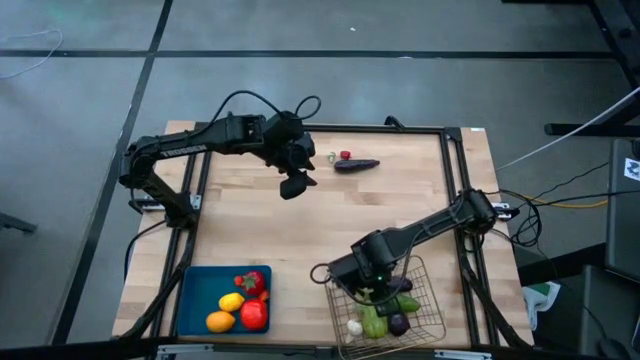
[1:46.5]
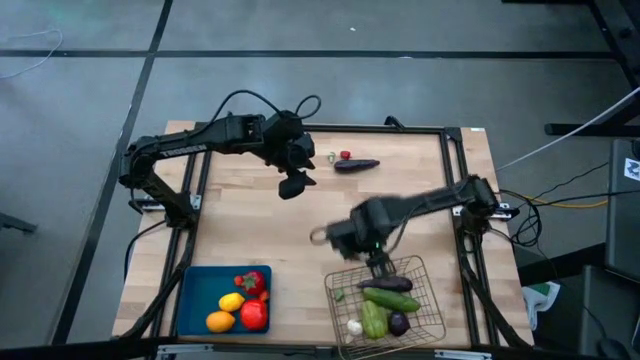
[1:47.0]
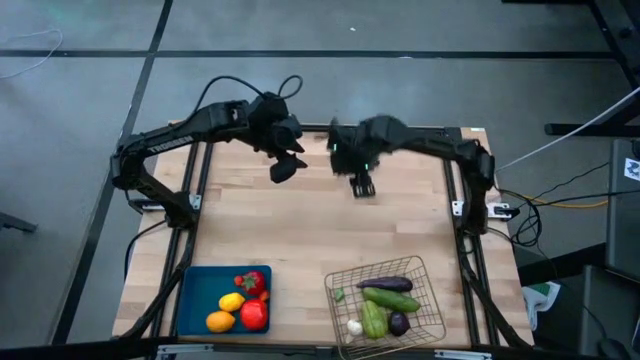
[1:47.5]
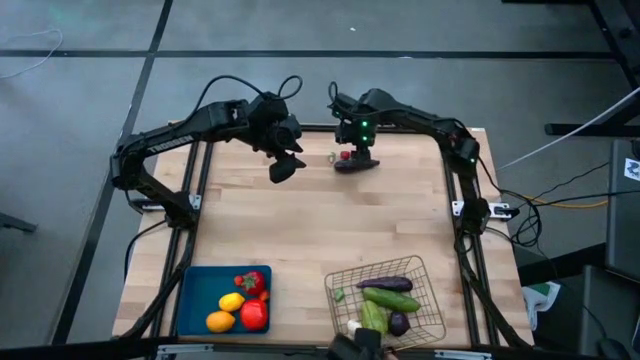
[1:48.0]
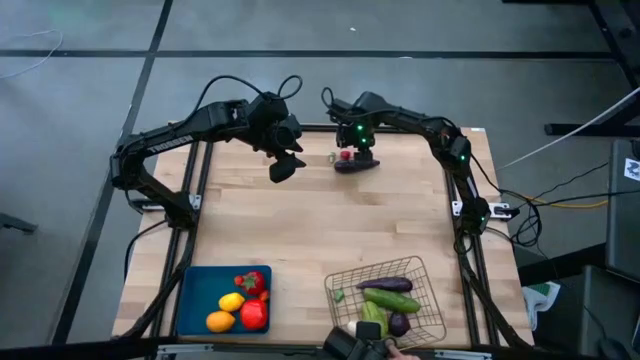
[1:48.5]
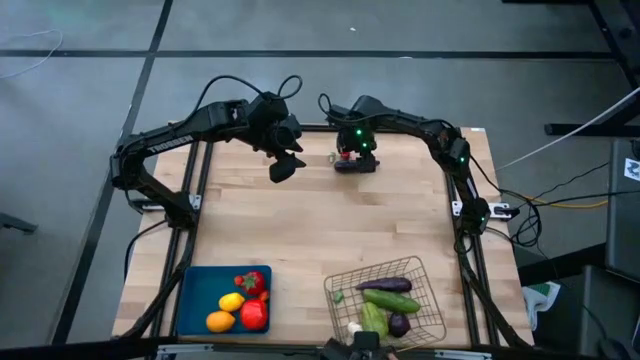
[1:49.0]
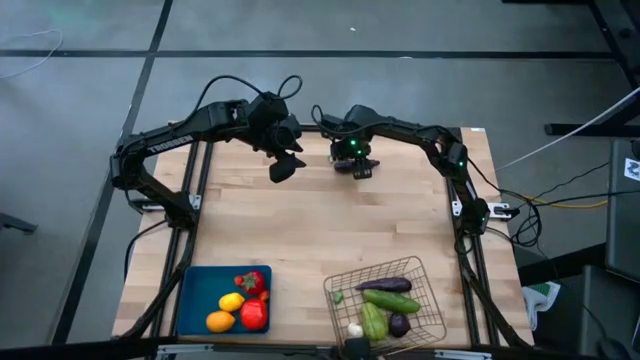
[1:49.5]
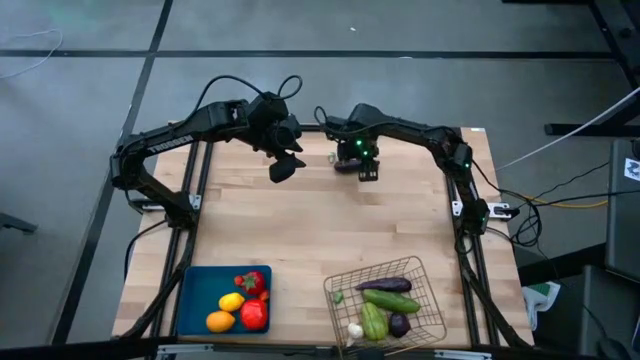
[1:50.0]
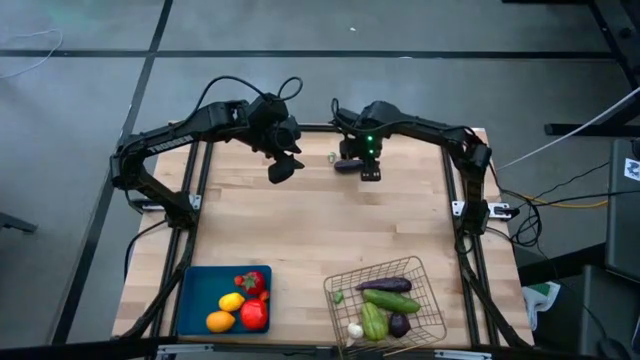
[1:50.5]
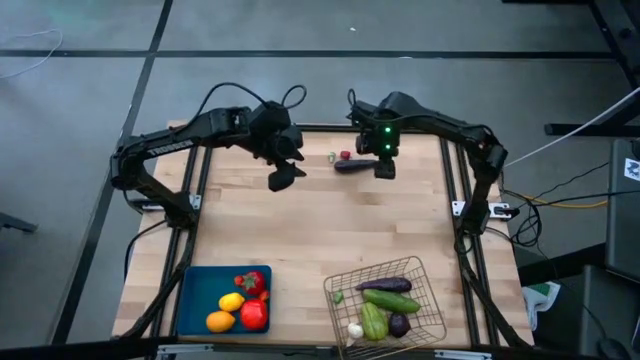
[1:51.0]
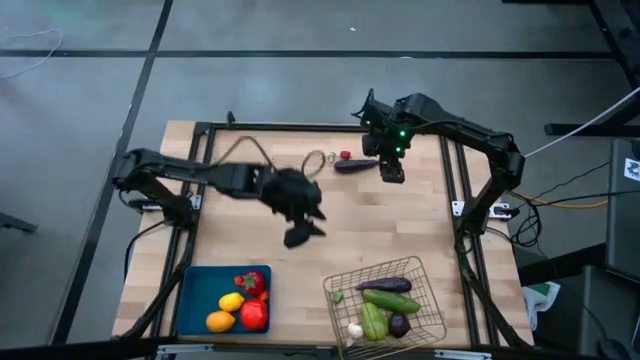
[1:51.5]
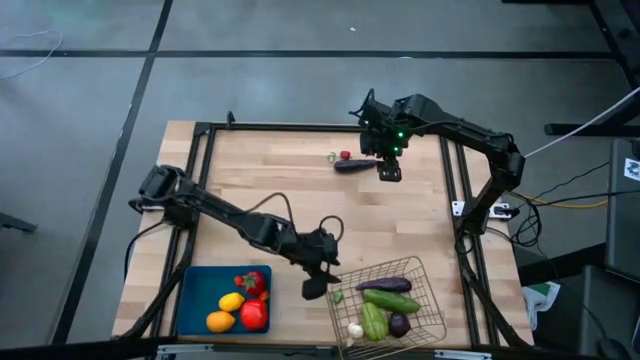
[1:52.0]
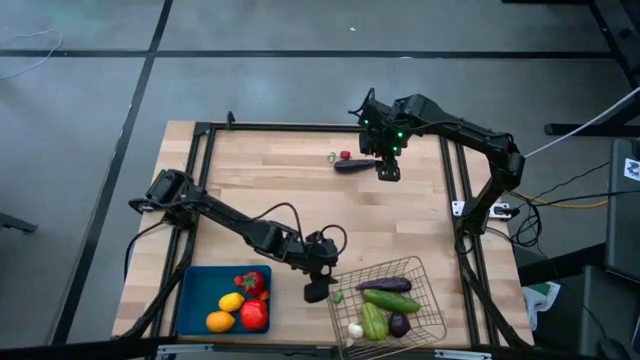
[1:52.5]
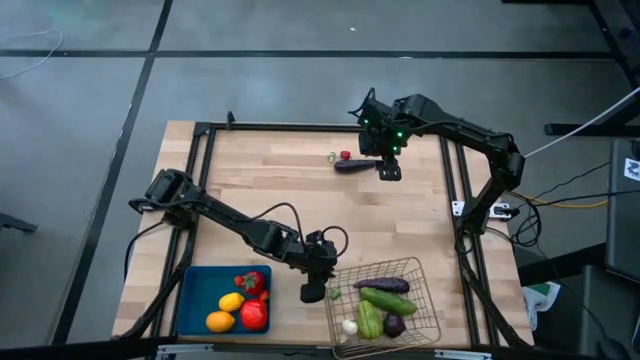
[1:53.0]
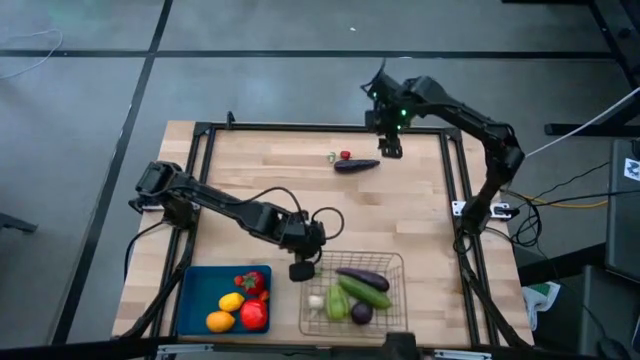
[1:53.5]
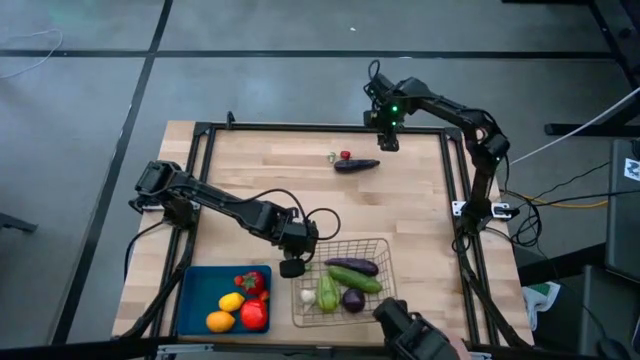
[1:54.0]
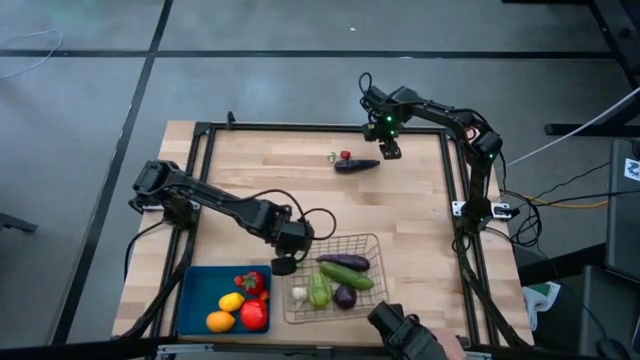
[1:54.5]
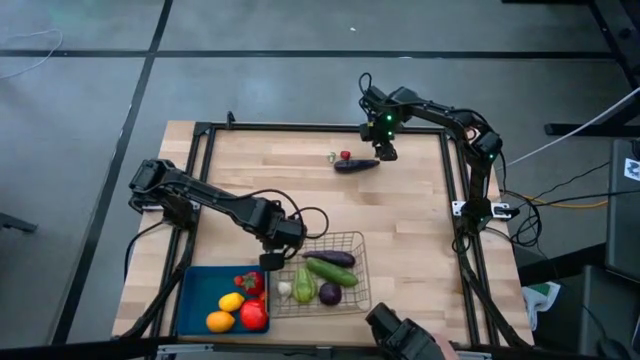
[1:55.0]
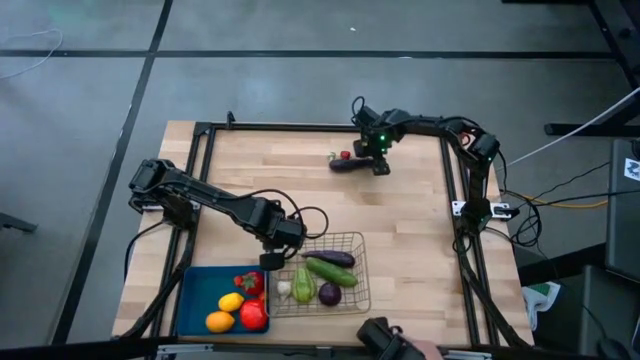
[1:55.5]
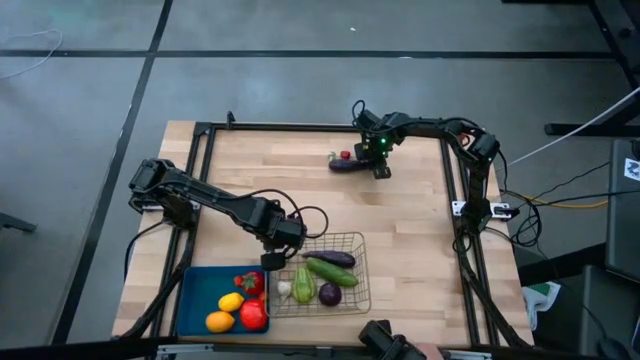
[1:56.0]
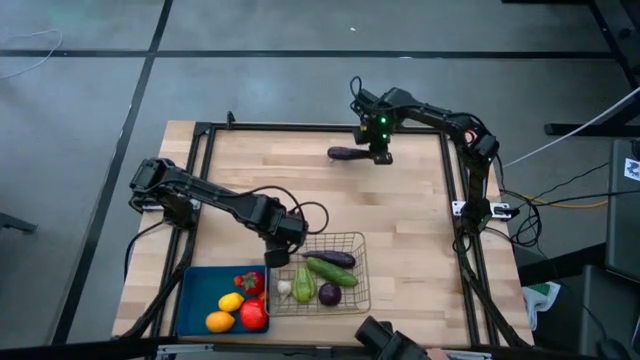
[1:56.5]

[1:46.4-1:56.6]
Task: Sort produce into baskets
Adjust the gold wire basket

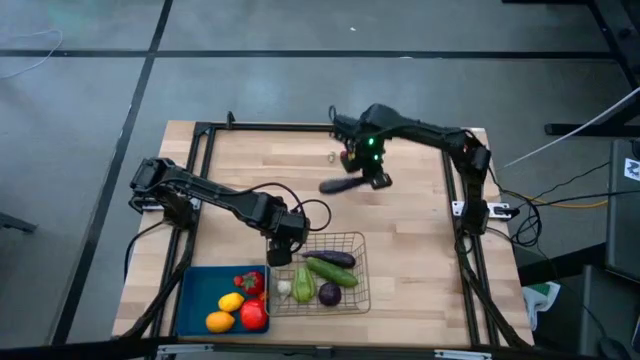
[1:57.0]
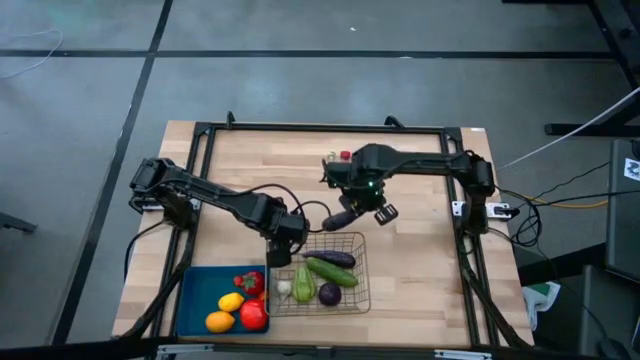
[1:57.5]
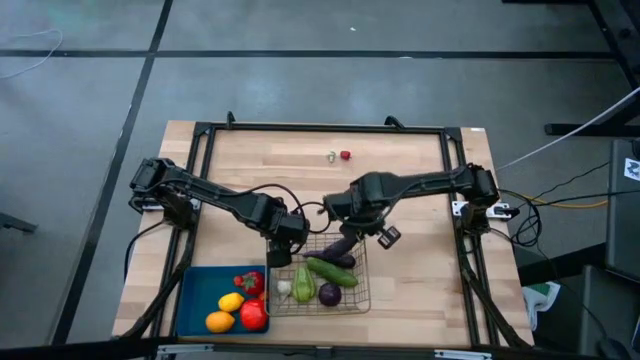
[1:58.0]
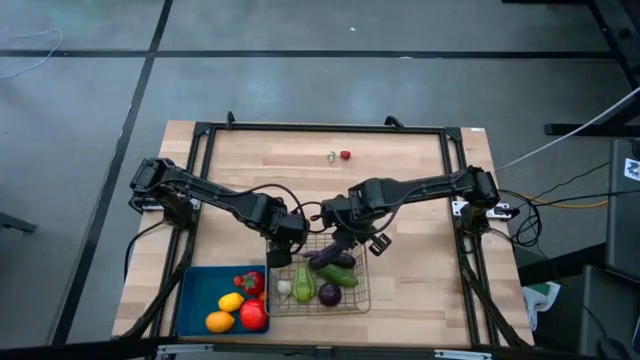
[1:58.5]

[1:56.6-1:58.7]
Put the eggplant into the gold wire basket

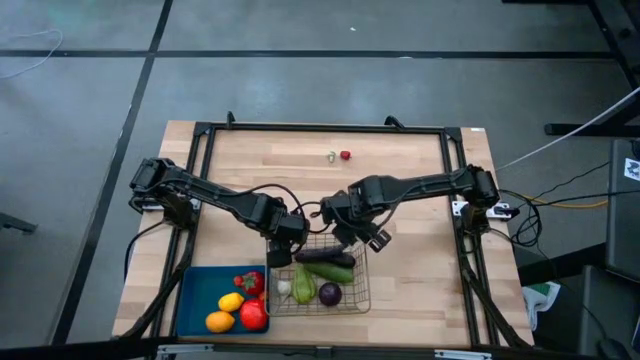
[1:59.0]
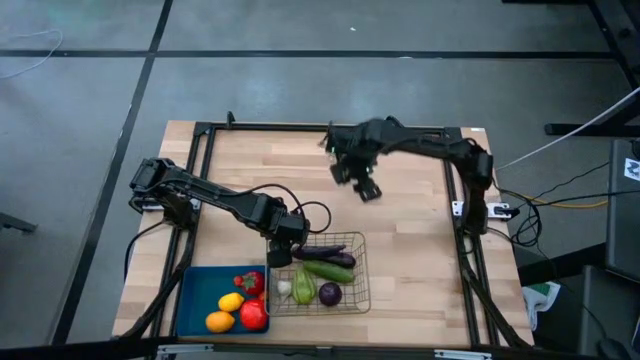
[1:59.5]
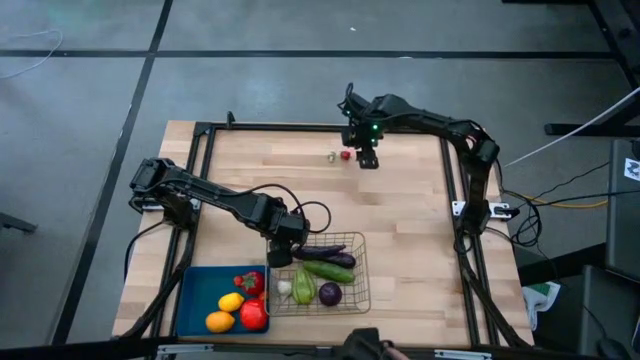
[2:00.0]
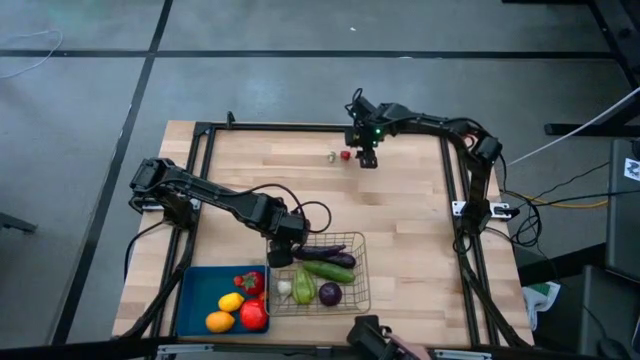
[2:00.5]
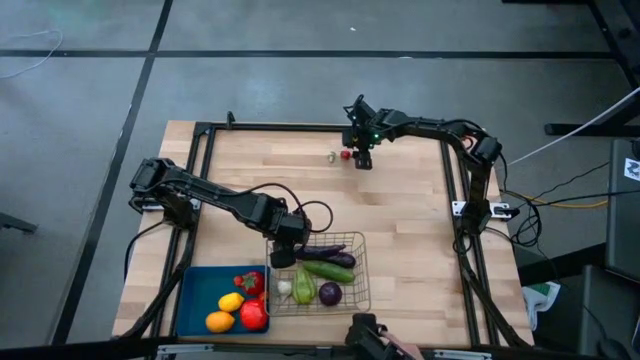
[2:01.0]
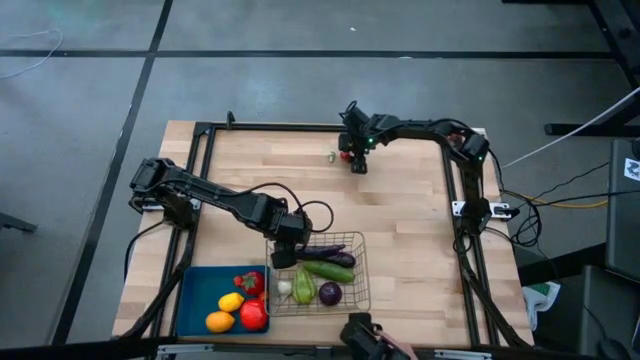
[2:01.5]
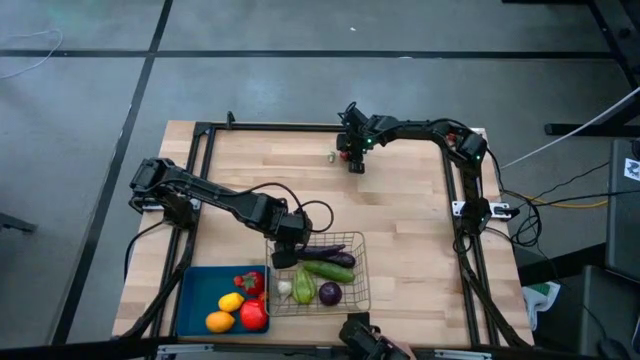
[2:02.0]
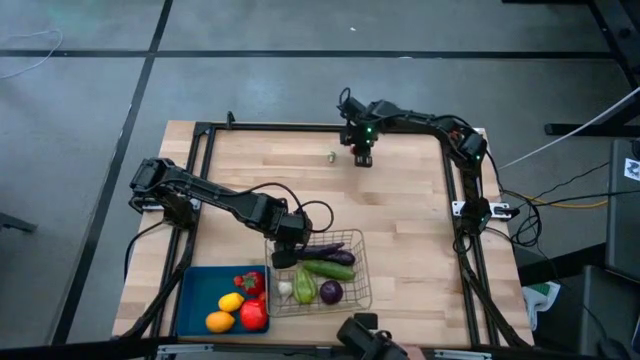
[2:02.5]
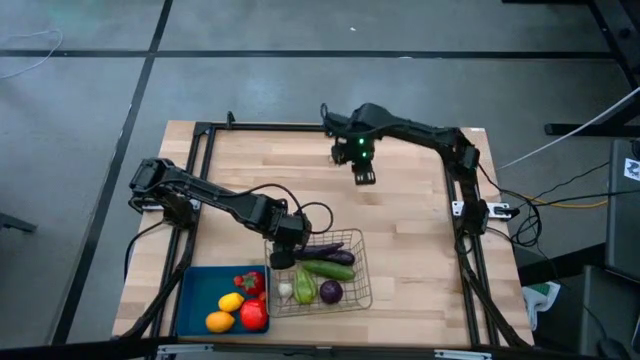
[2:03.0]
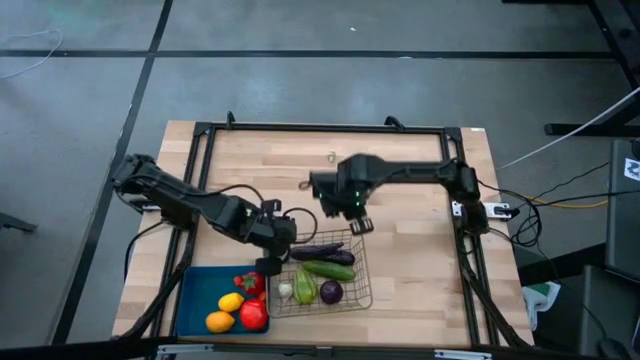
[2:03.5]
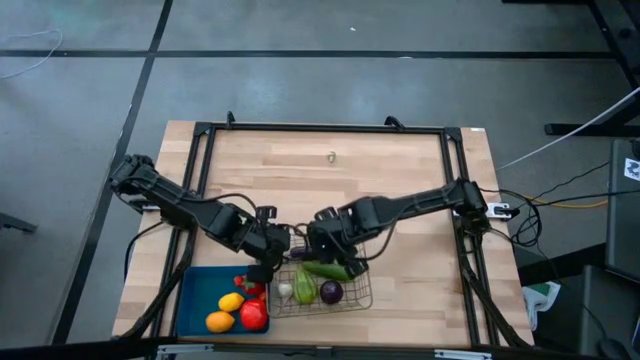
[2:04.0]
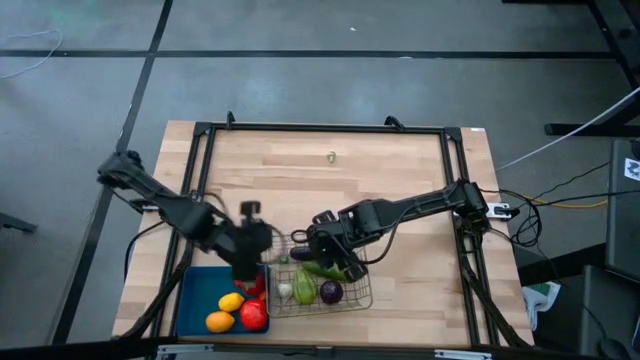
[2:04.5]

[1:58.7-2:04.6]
Put the red bell pepper into the gold wire basket
